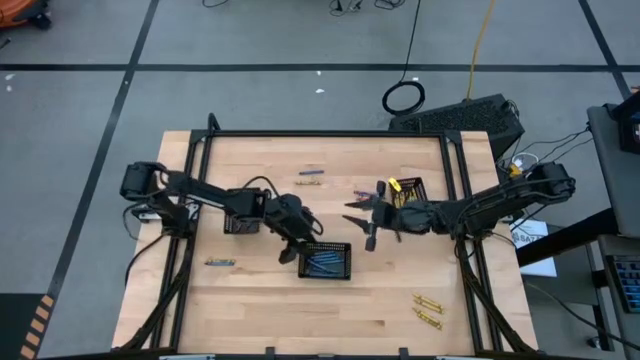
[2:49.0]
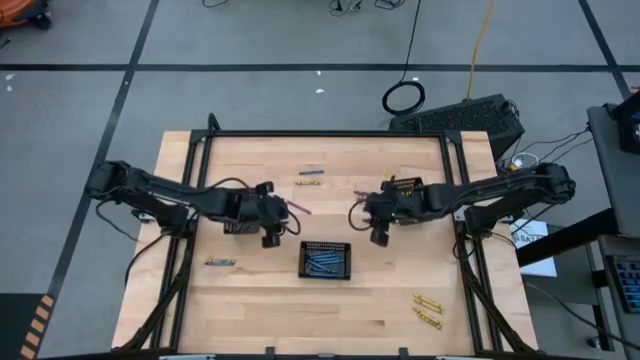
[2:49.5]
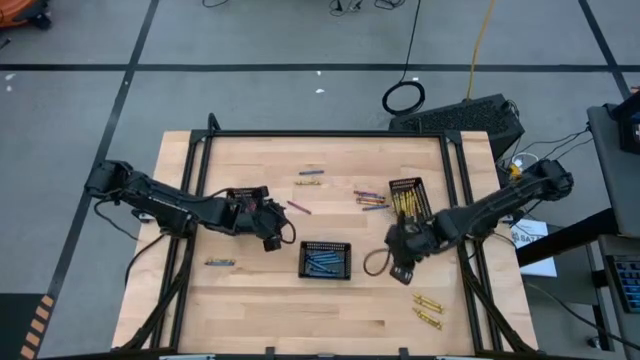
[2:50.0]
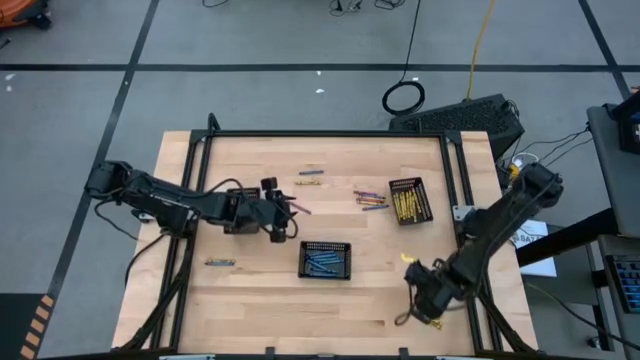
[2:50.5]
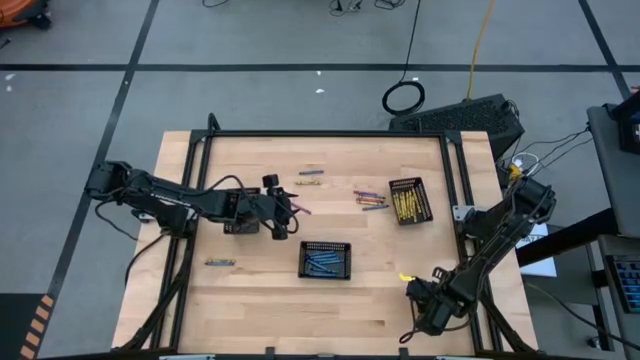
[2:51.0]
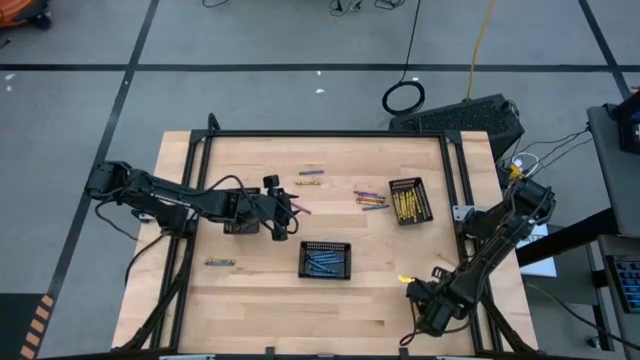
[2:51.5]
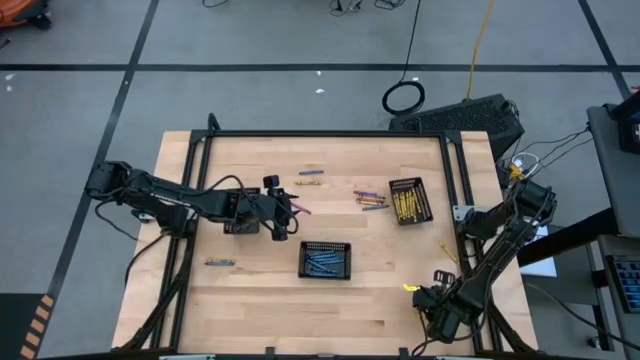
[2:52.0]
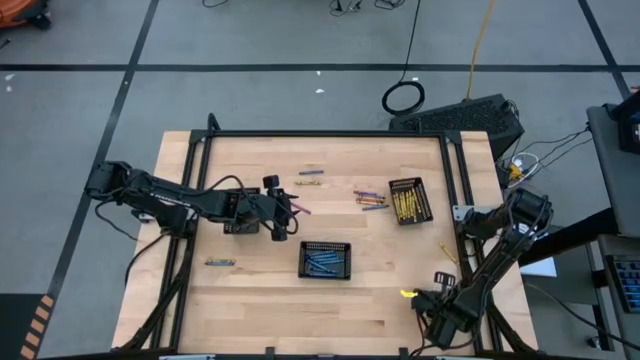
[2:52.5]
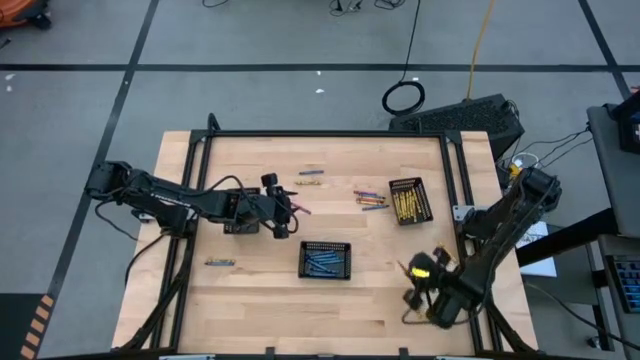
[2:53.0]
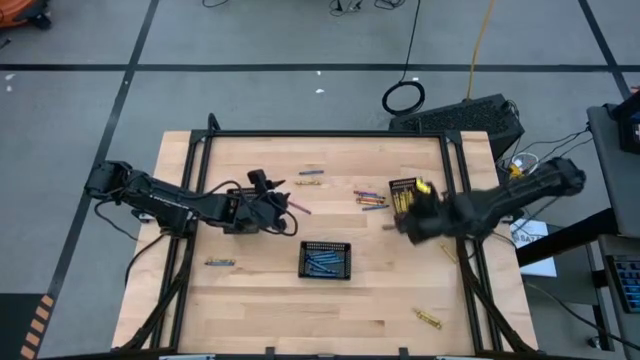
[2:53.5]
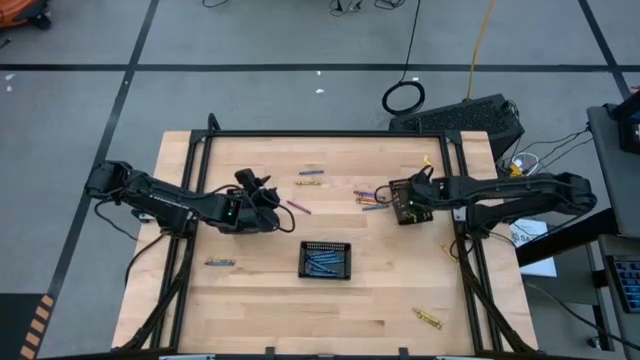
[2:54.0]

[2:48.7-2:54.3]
Task: Sort crayons
Put the yellow crayon into the right black basket

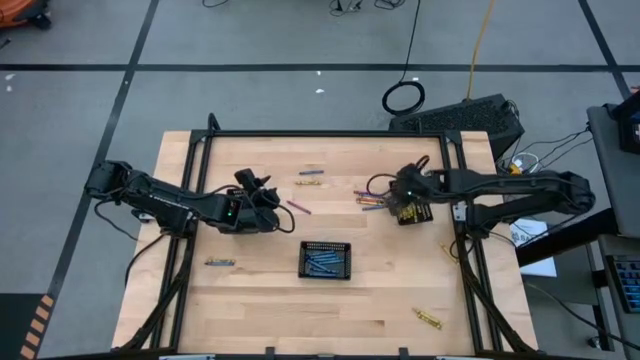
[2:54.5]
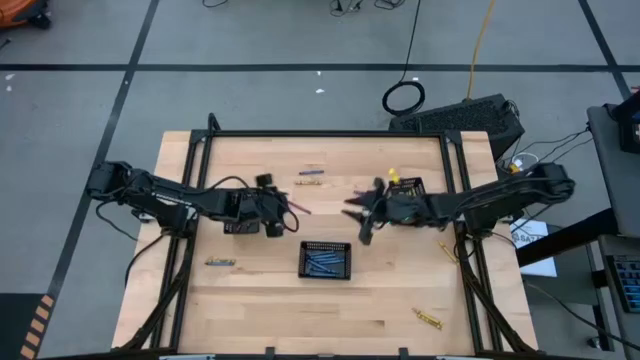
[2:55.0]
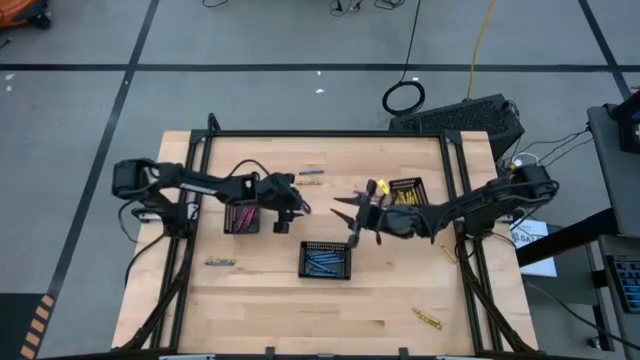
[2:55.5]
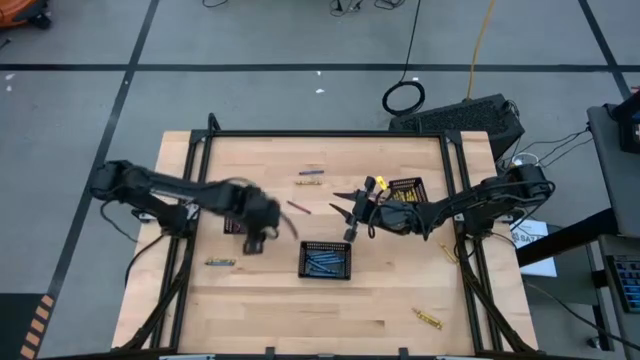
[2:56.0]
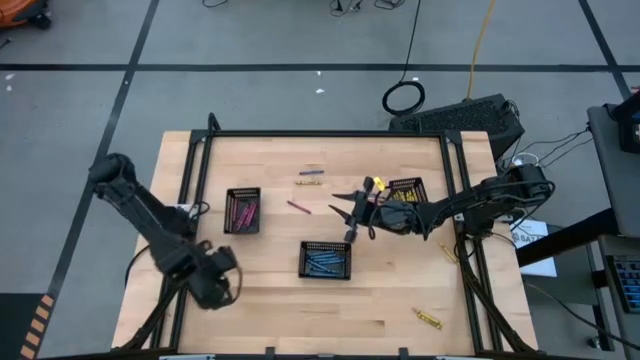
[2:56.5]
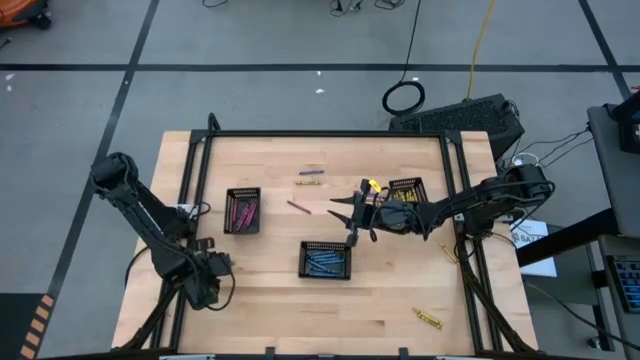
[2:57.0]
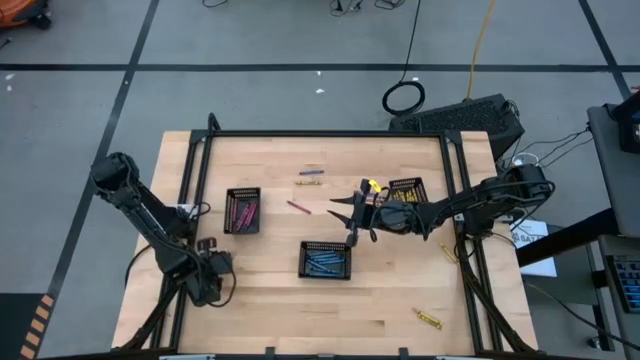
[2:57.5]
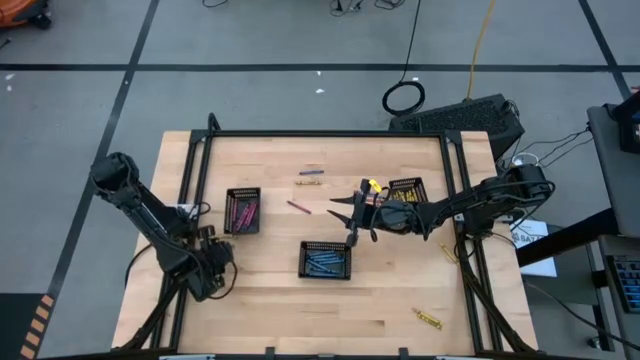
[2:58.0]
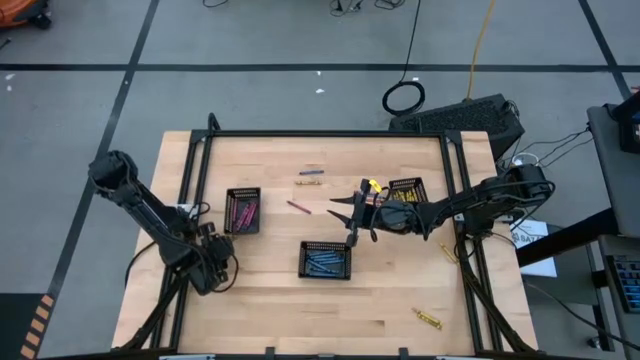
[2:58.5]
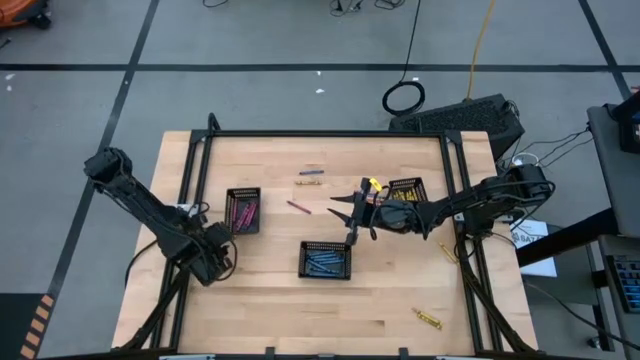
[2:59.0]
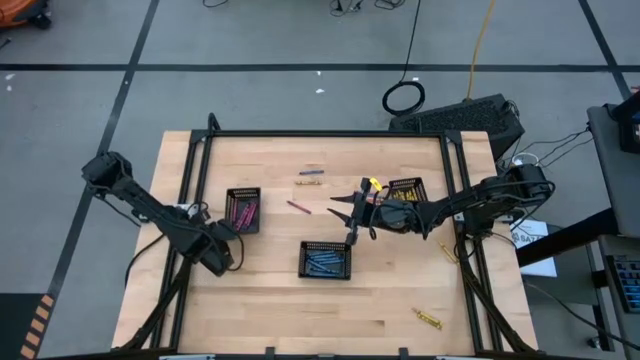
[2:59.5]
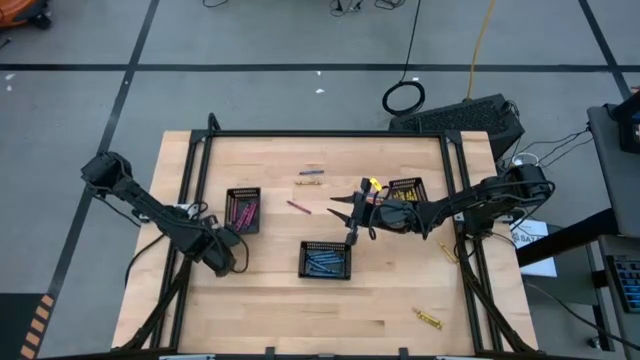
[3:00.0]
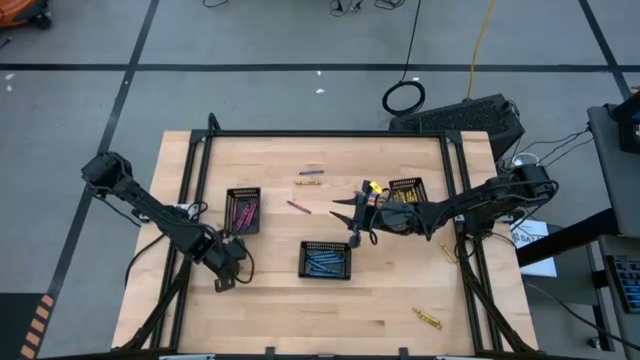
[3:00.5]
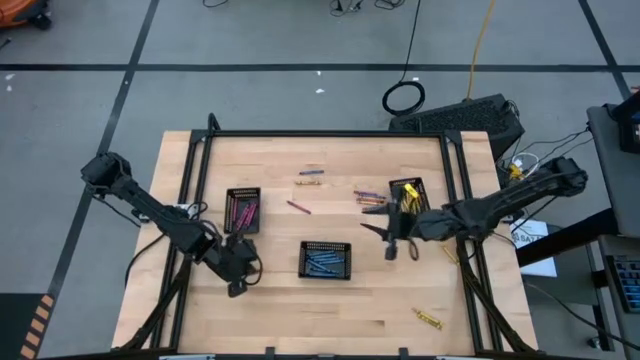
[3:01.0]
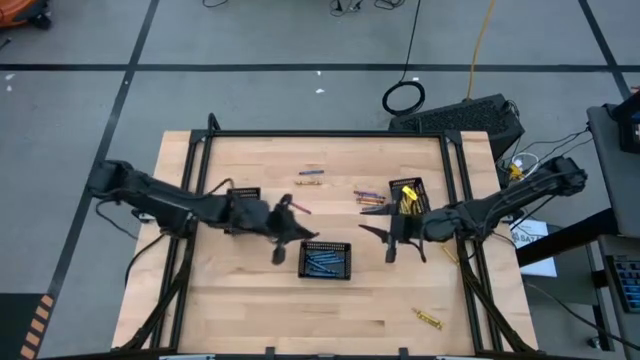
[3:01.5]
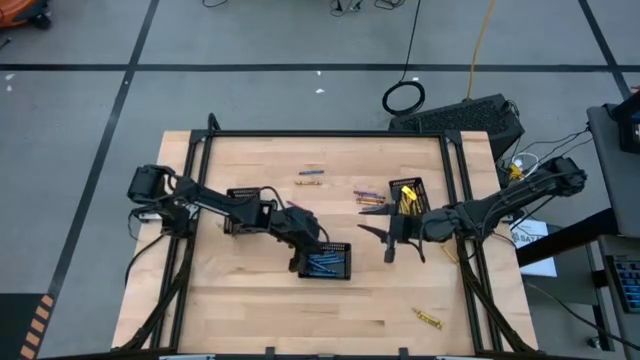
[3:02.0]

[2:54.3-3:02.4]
Put the blue crayon into the center black basket

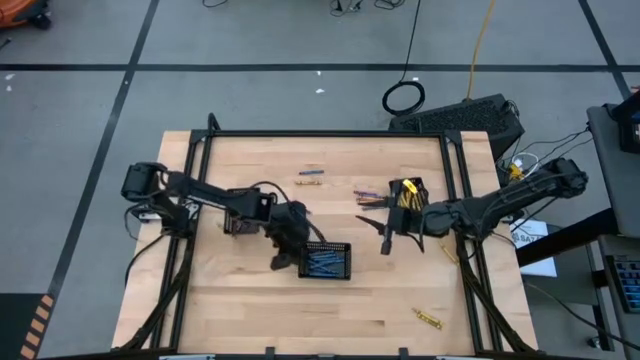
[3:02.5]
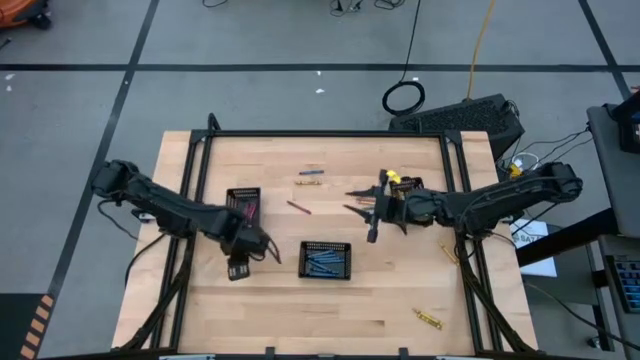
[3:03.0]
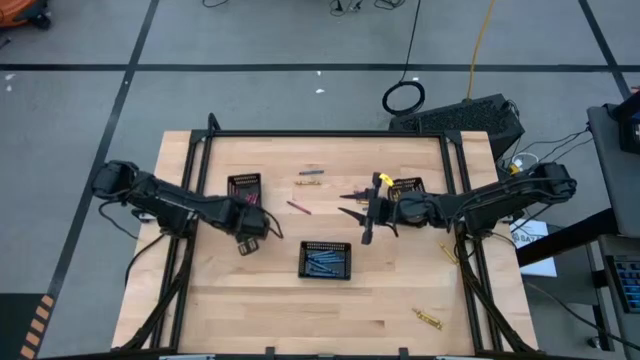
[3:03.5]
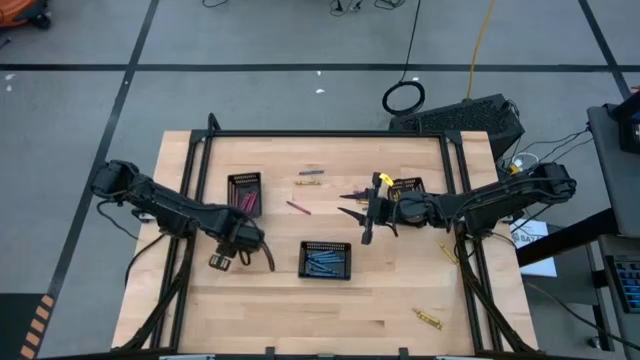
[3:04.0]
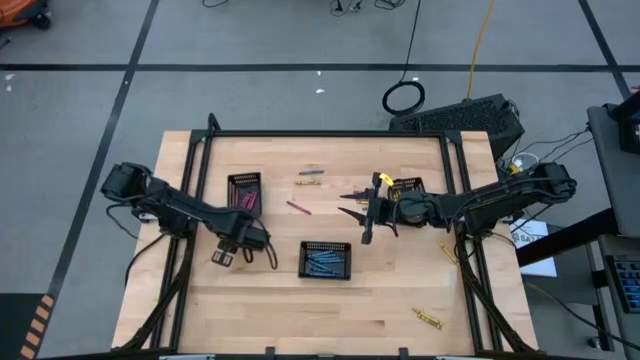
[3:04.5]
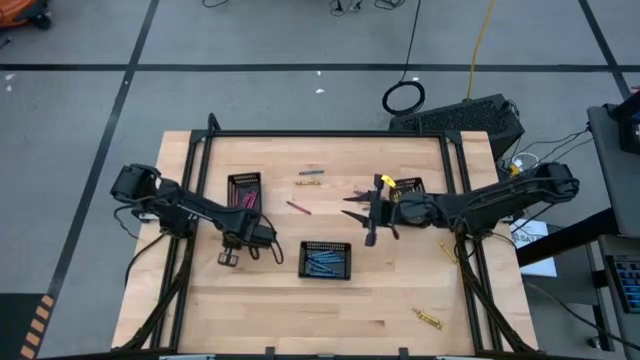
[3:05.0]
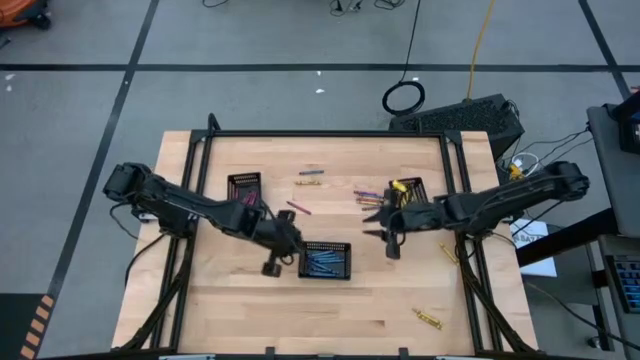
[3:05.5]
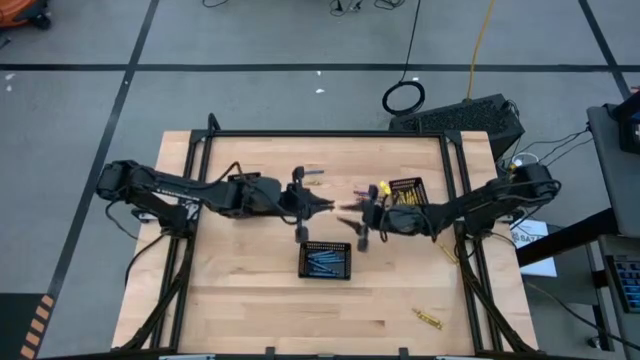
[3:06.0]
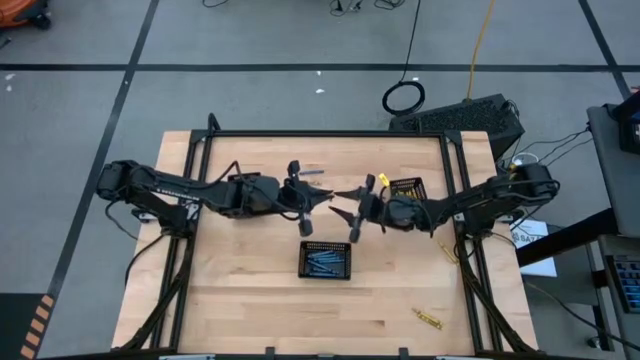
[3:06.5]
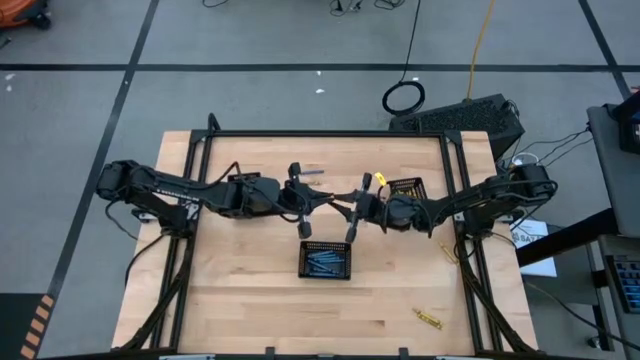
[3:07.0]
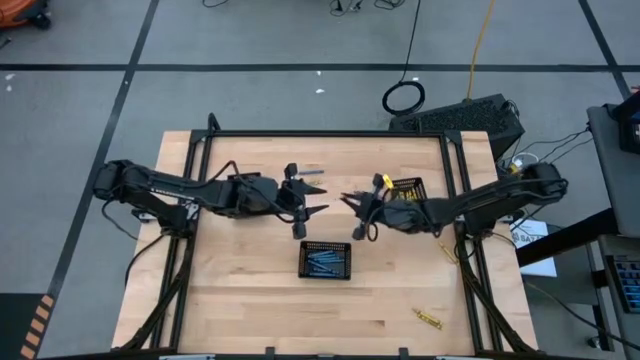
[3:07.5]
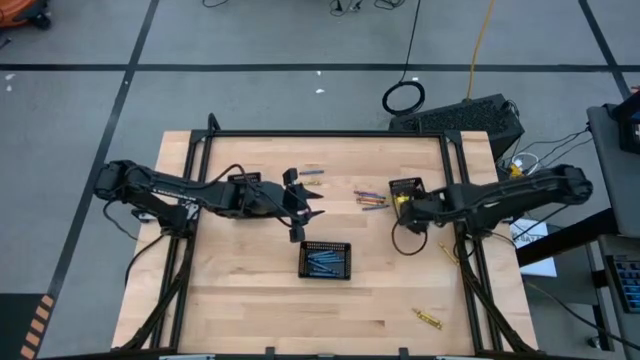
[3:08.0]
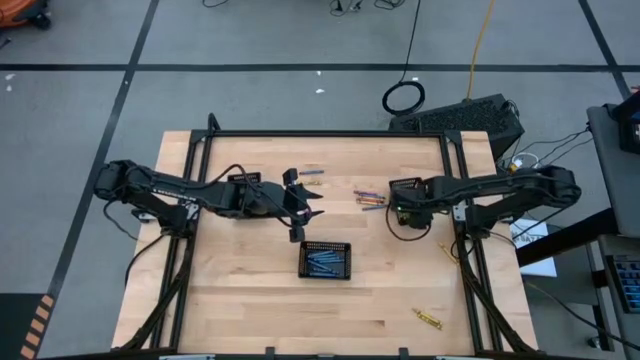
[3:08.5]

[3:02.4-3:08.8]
Put the yellow crayon into the right black basket

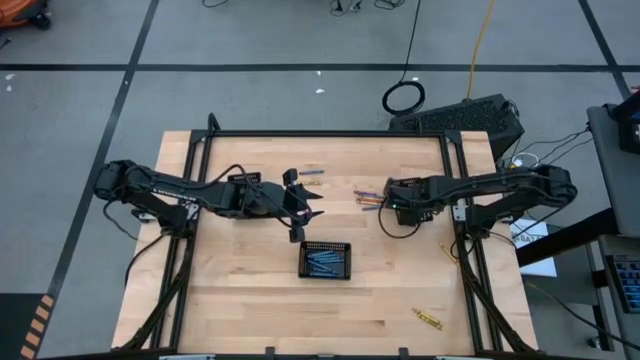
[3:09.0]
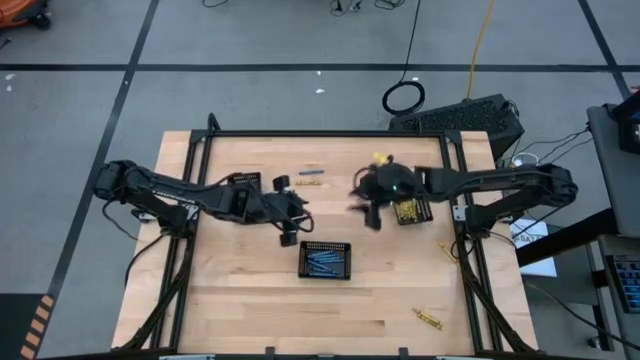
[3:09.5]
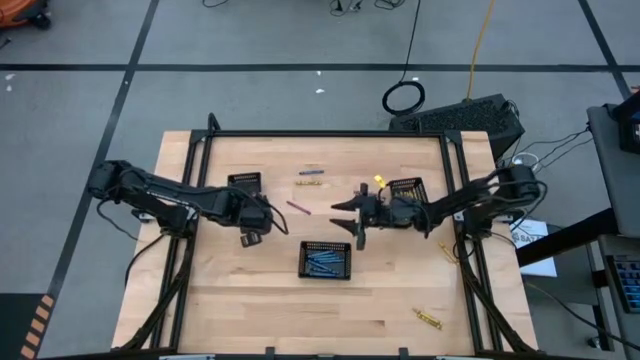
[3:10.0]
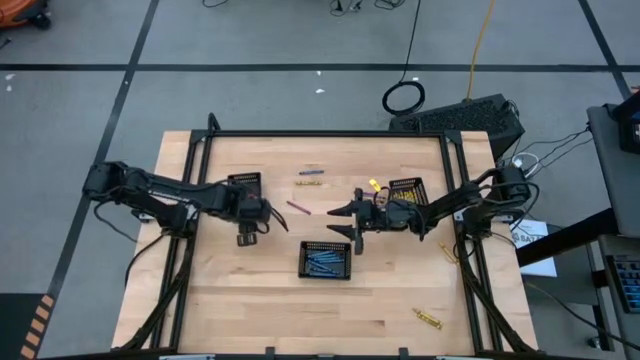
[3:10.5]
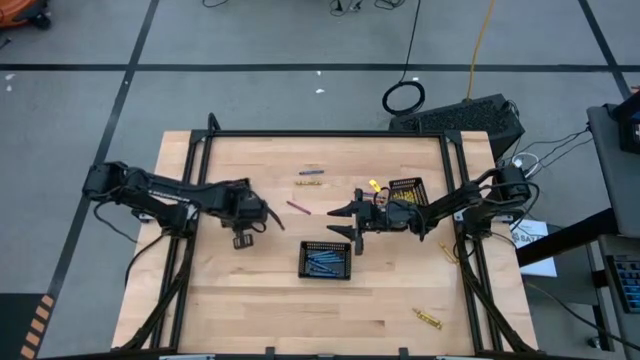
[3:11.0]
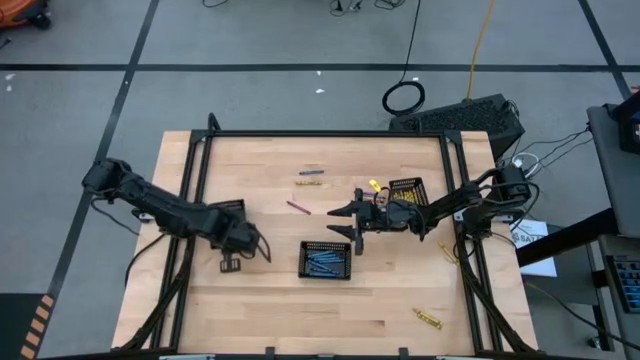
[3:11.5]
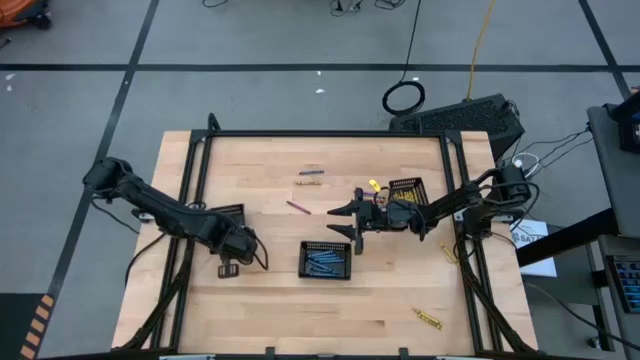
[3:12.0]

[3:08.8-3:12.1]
Adjust the left black basket
